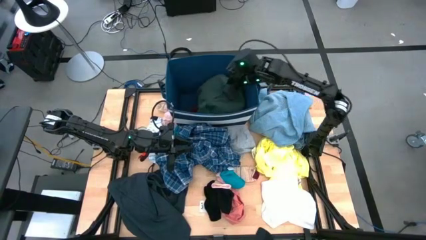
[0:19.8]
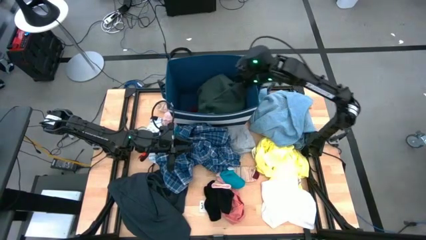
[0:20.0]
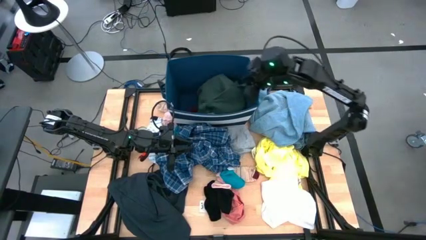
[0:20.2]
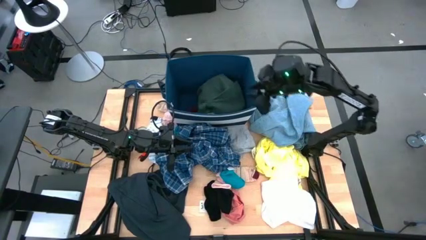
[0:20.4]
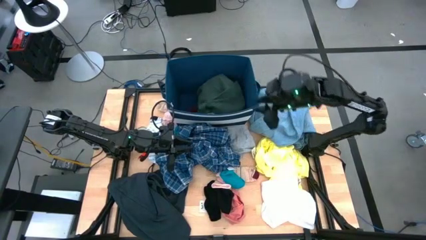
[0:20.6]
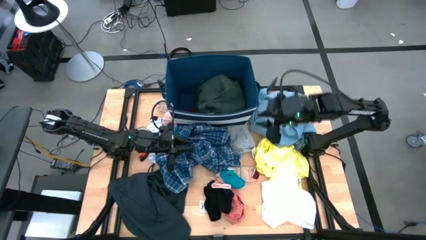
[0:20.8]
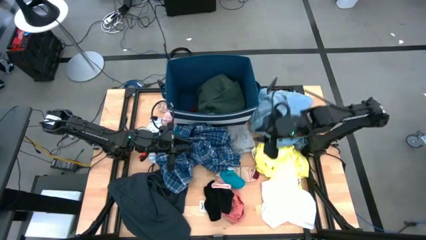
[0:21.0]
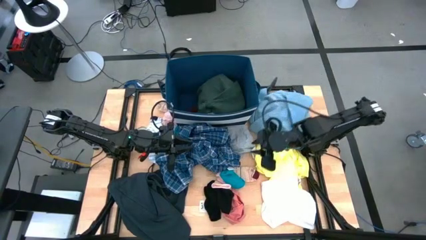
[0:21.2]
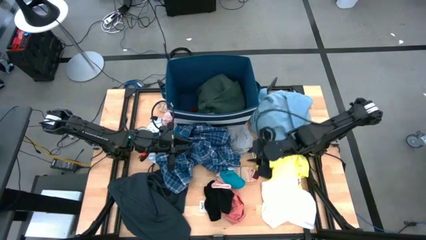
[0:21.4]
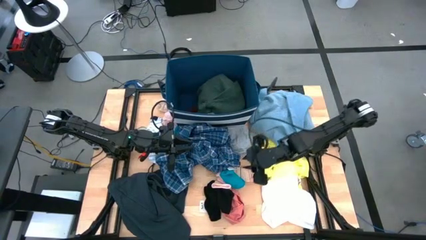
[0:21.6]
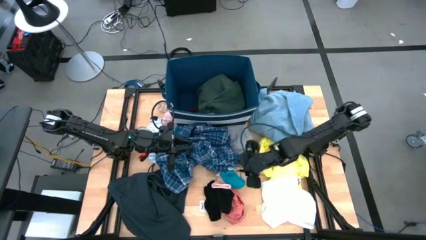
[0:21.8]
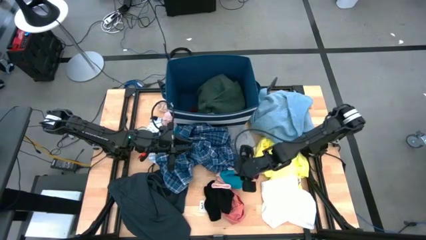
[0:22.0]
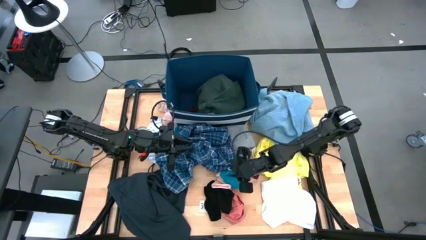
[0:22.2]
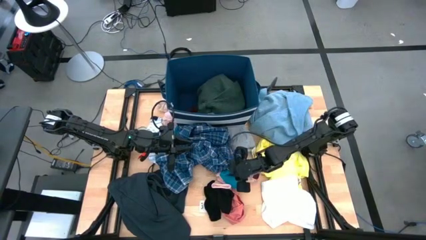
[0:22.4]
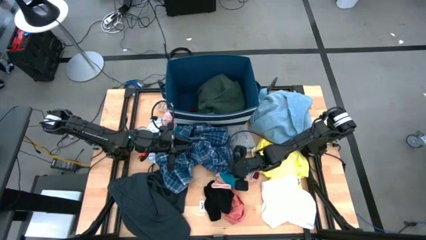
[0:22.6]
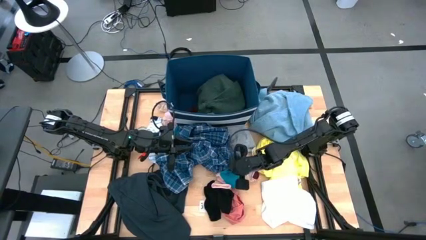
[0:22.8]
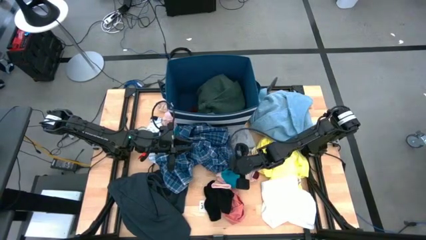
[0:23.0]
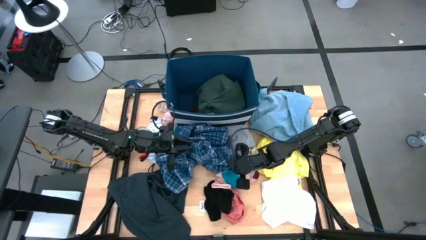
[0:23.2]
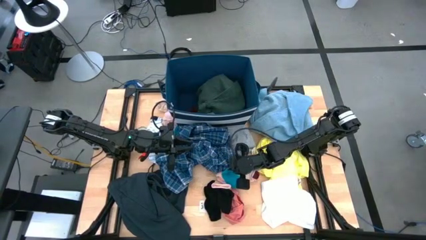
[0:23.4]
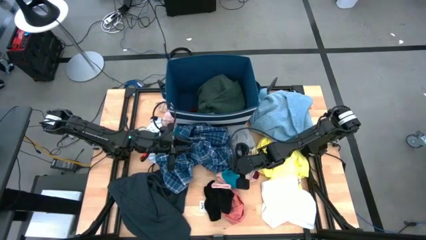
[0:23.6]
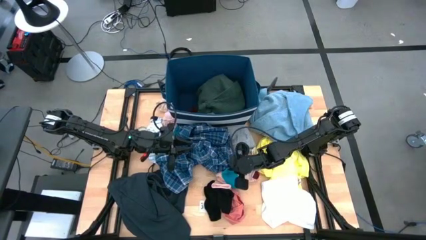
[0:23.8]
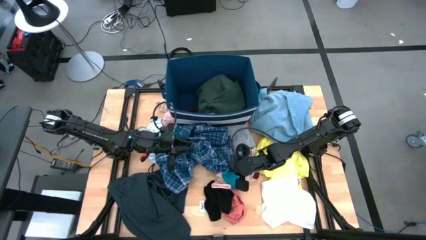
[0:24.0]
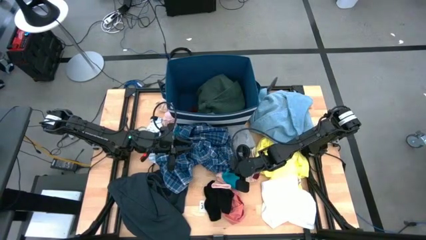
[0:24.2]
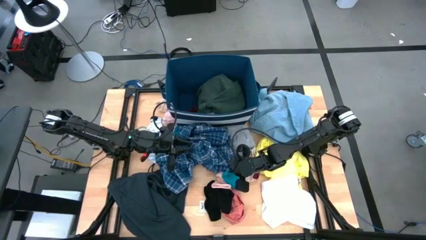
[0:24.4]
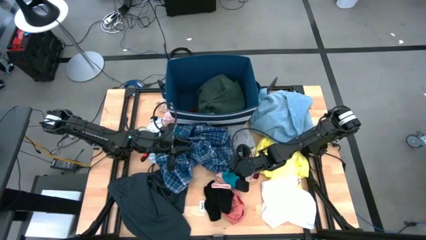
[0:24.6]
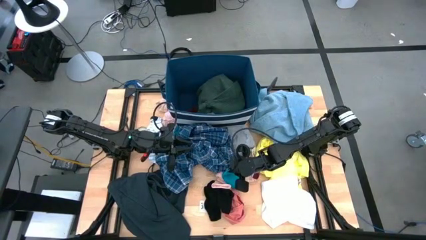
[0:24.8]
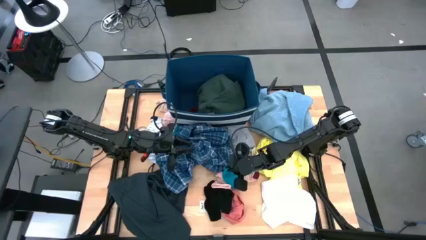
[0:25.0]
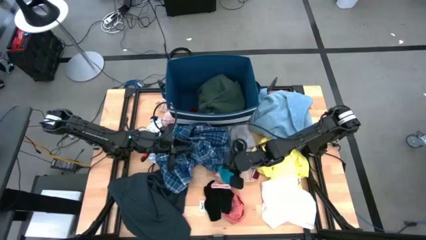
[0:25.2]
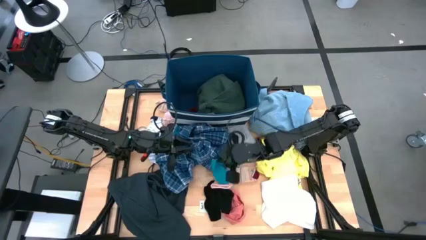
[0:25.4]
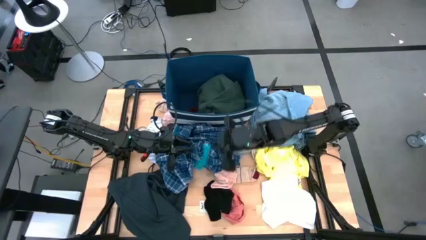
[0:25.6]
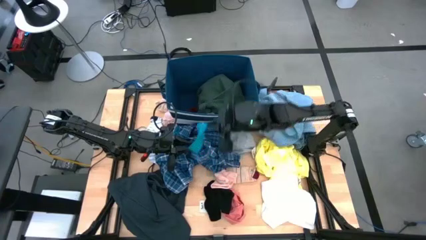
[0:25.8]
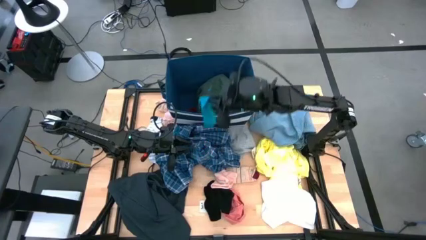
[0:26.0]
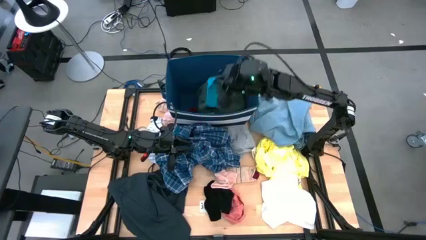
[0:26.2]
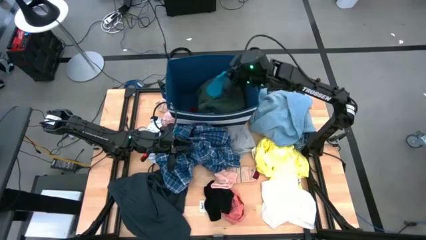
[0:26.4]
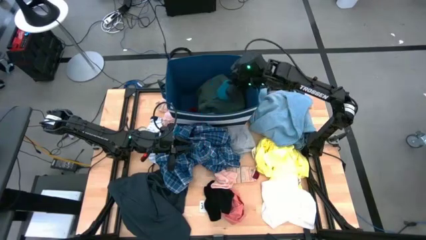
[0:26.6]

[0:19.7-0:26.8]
Task: Sort clothes
Put the blue sock into the blue laundry organizer

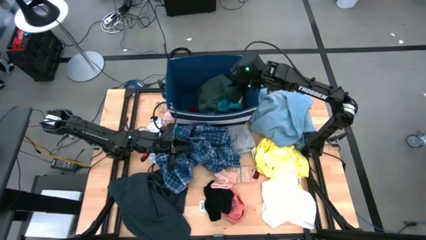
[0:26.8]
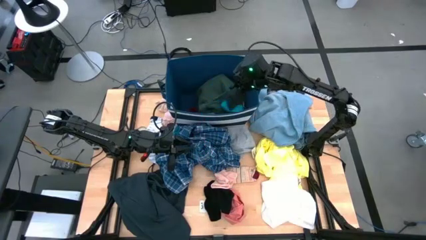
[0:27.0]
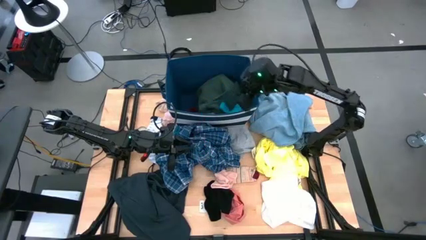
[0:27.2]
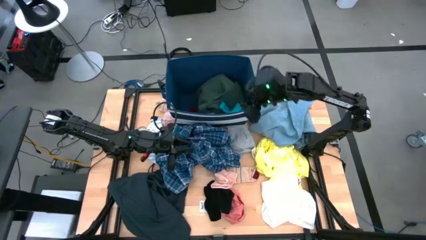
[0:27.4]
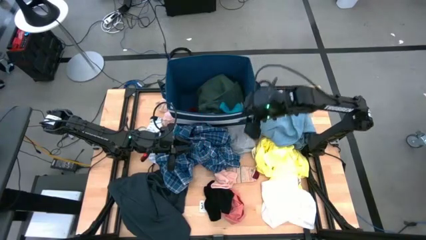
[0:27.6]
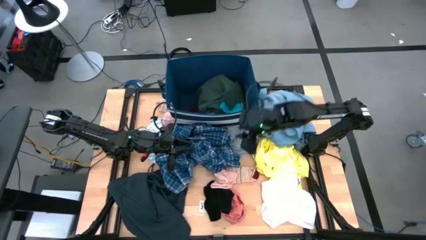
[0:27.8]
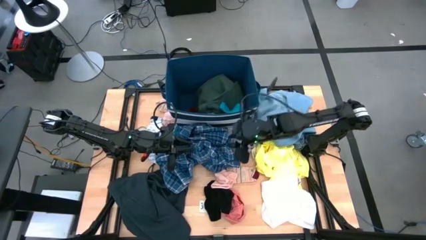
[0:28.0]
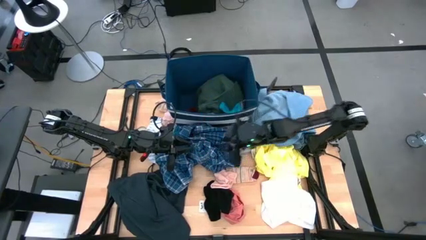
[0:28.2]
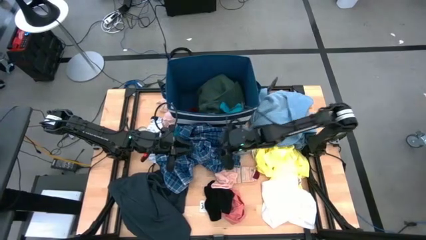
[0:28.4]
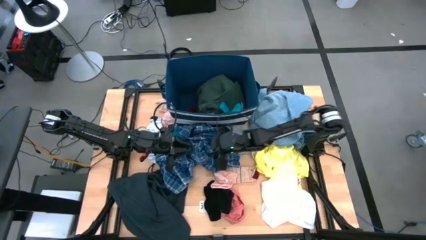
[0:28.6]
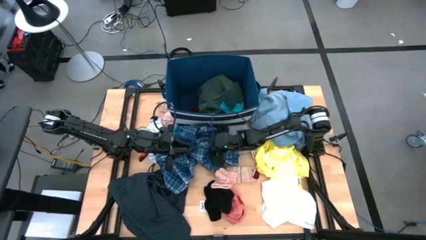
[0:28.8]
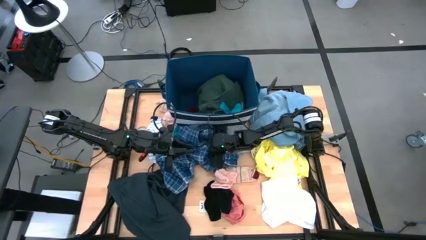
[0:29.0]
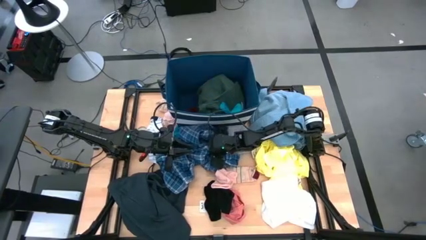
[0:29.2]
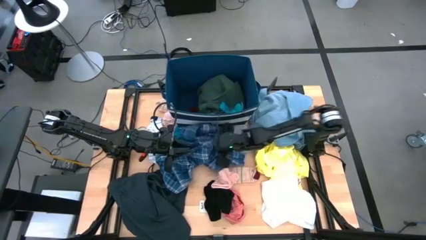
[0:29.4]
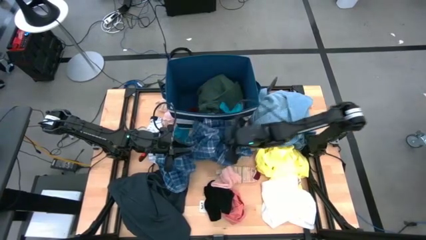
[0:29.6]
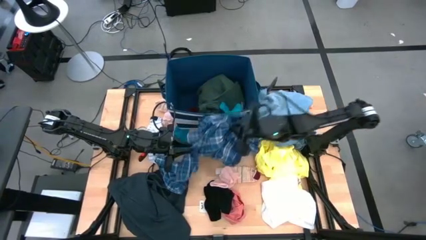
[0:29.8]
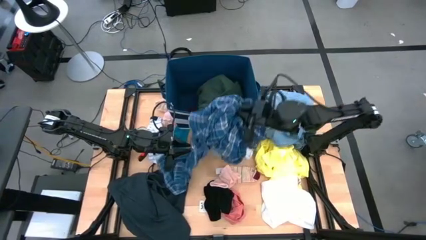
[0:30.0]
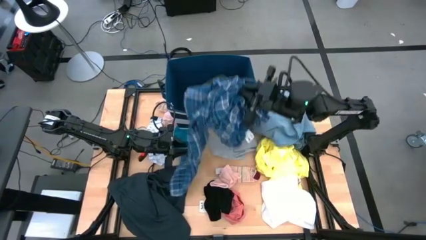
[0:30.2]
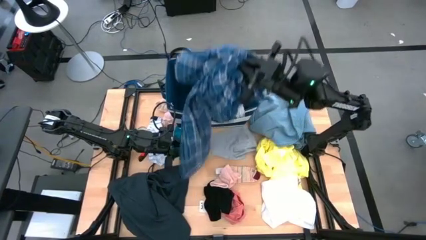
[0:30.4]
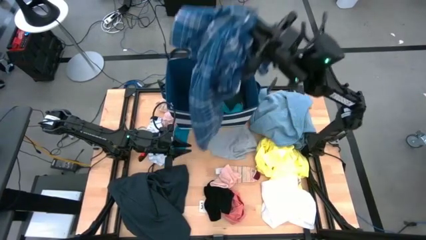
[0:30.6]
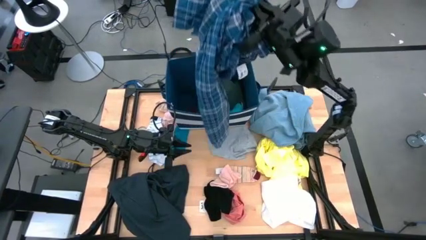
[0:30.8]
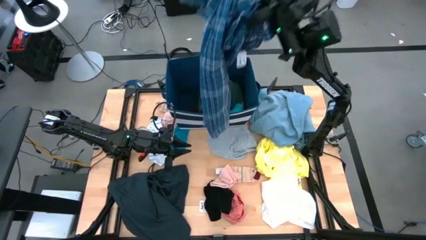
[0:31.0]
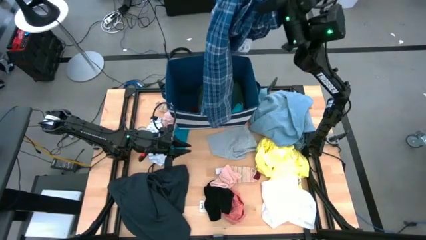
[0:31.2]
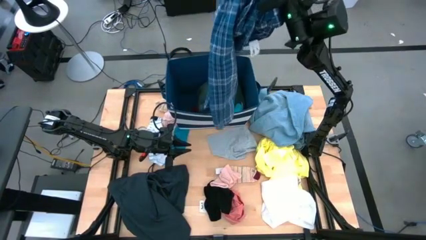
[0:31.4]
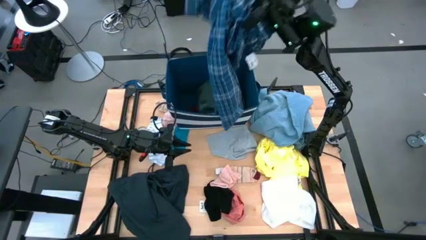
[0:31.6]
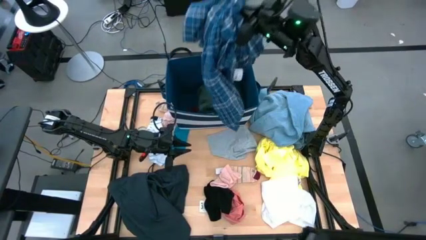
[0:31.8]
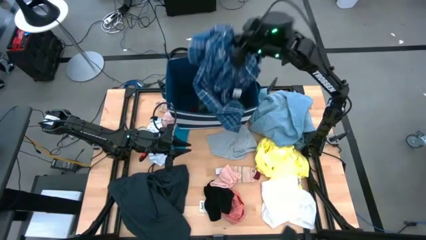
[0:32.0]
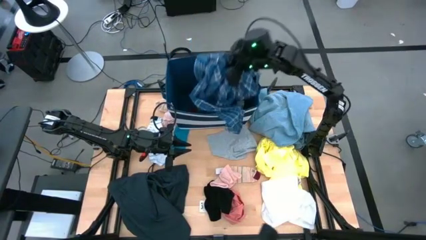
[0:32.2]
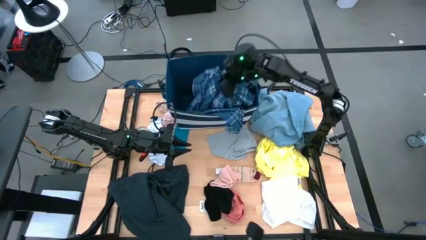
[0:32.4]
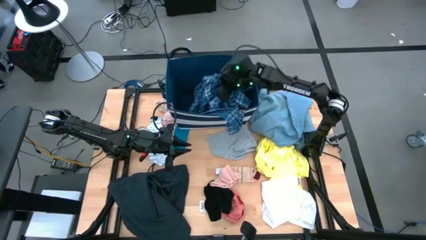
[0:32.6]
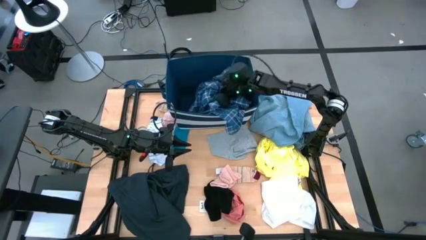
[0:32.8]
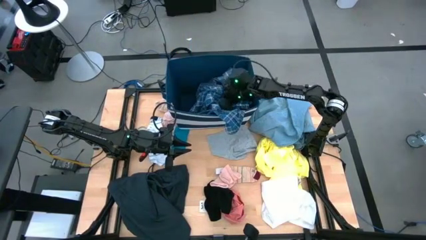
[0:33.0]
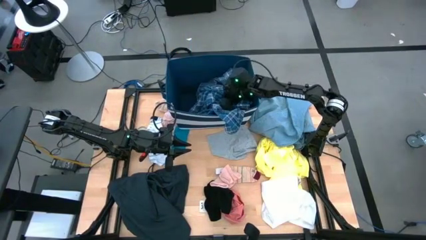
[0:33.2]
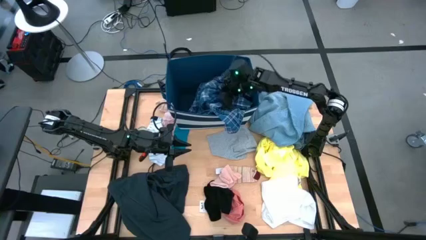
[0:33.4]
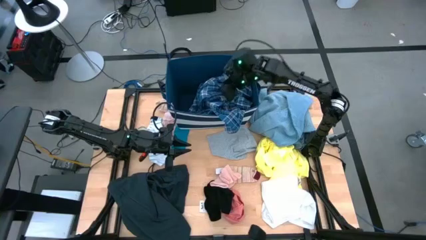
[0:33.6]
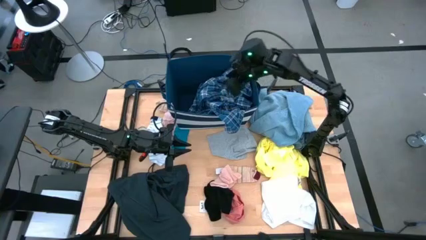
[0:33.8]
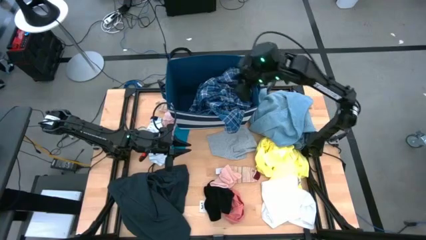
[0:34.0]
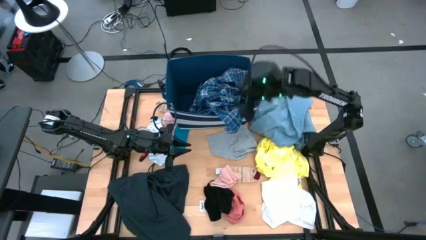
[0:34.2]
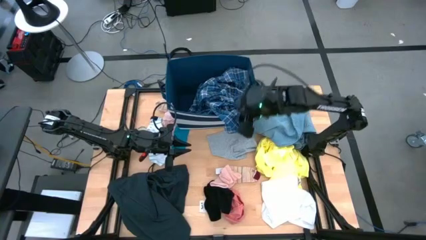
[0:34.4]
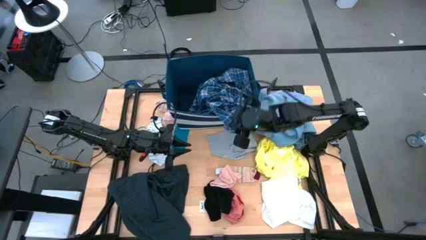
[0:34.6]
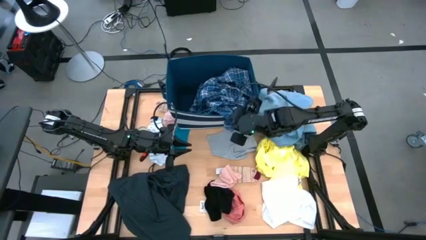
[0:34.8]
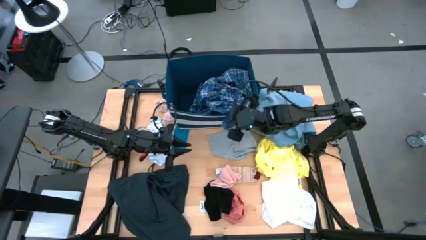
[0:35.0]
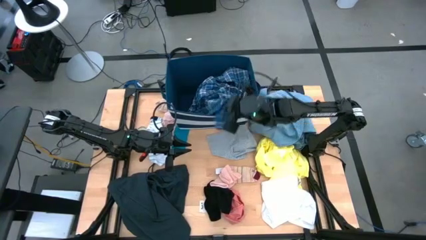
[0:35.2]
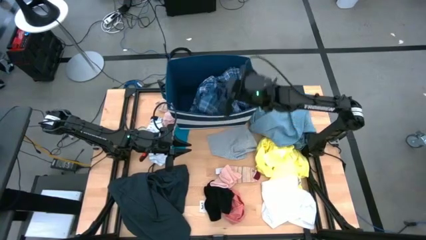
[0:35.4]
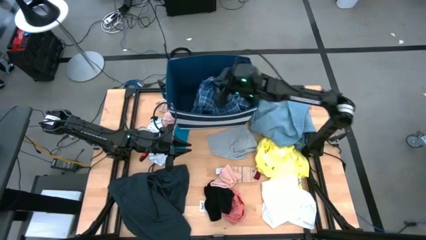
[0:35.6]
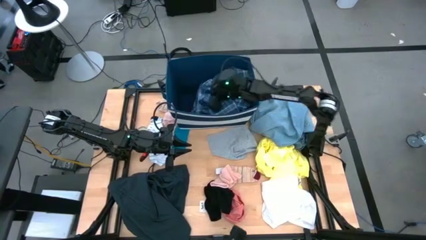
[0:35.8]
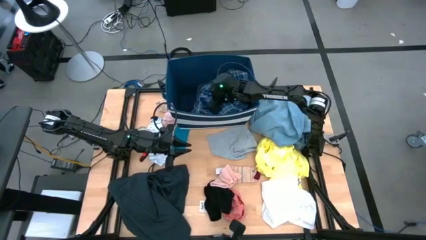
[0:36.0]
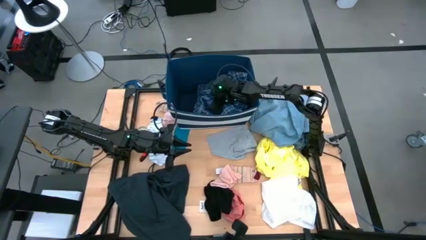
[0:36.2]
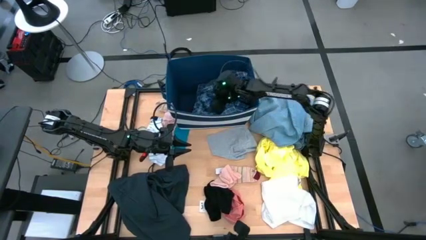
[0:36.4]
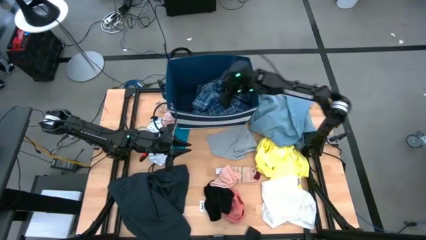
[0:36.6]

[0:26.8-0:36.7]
Put the blue checkered shirt into the blue laundry organizer
